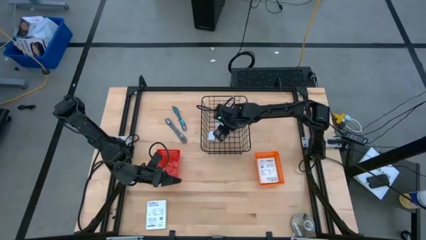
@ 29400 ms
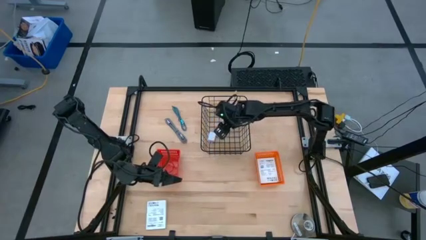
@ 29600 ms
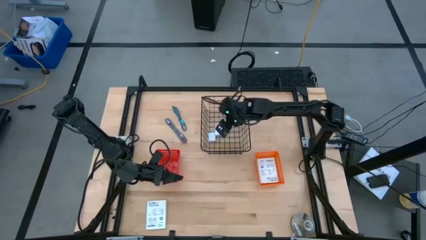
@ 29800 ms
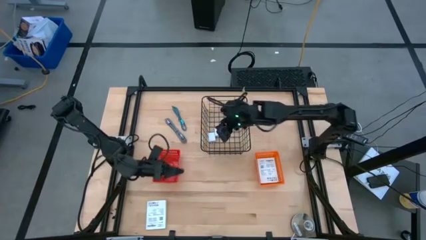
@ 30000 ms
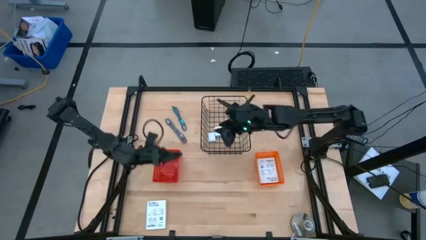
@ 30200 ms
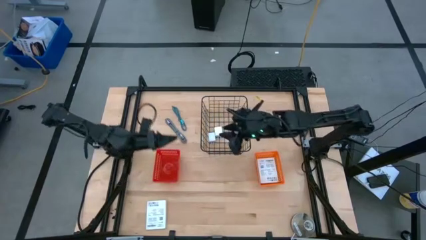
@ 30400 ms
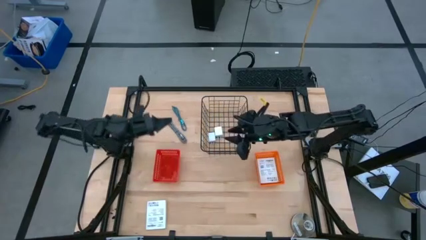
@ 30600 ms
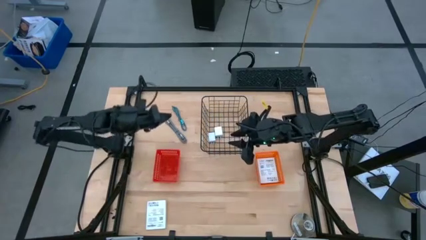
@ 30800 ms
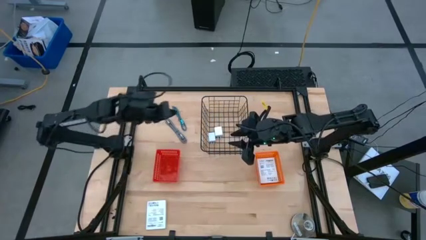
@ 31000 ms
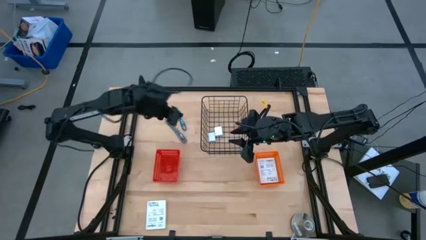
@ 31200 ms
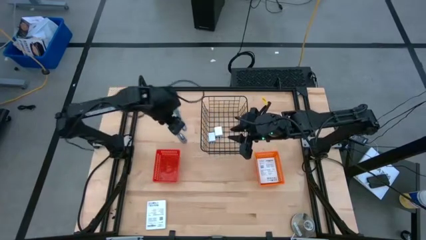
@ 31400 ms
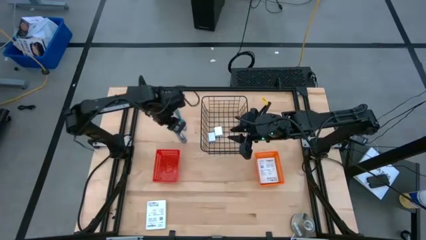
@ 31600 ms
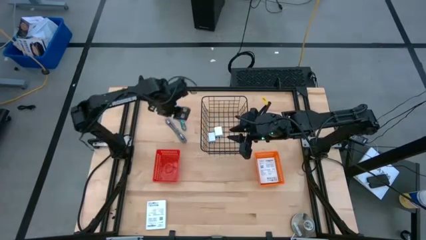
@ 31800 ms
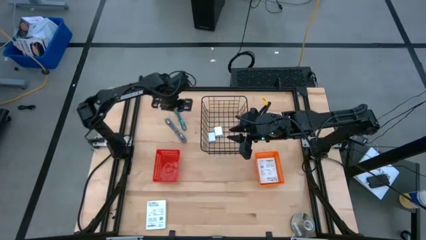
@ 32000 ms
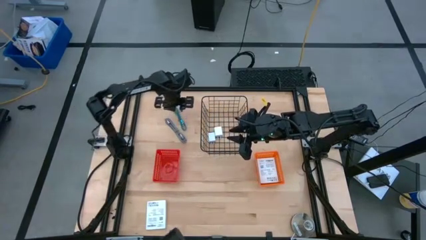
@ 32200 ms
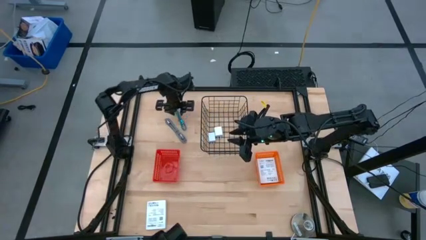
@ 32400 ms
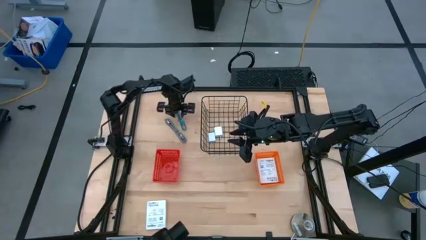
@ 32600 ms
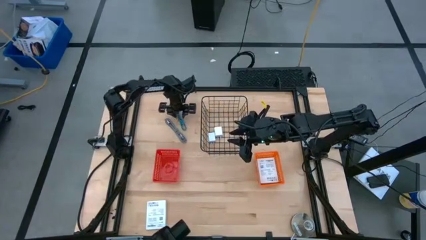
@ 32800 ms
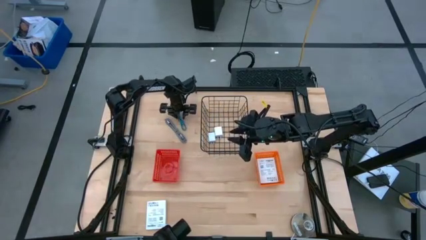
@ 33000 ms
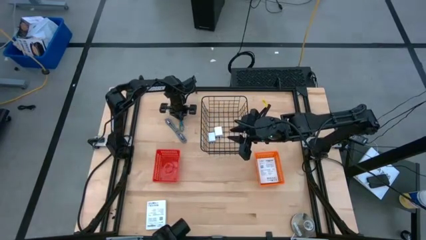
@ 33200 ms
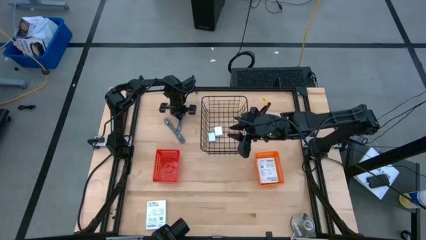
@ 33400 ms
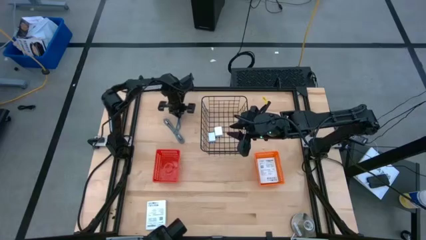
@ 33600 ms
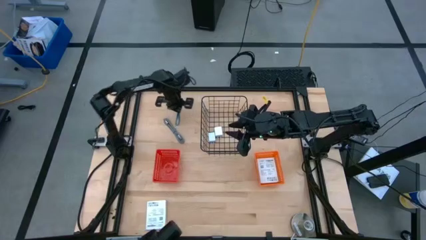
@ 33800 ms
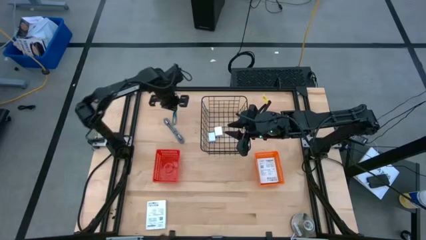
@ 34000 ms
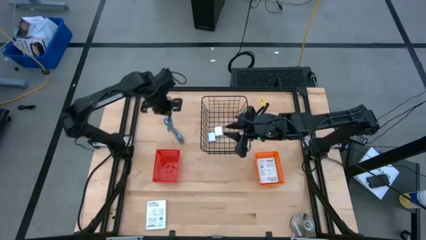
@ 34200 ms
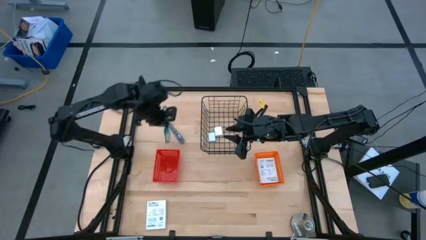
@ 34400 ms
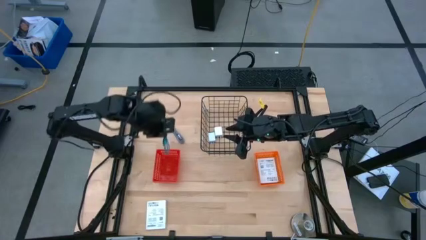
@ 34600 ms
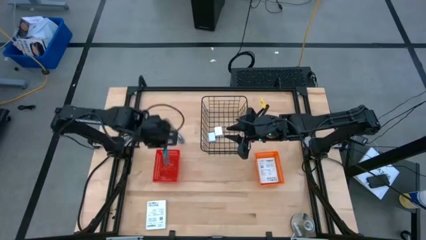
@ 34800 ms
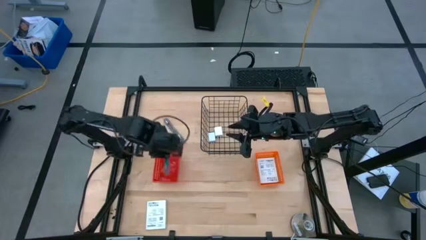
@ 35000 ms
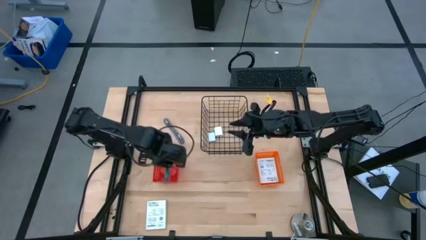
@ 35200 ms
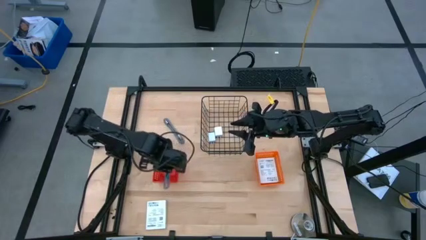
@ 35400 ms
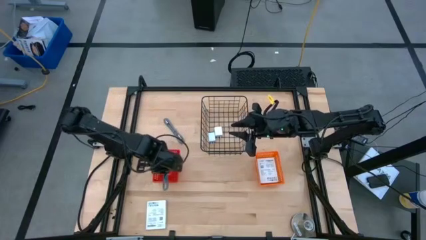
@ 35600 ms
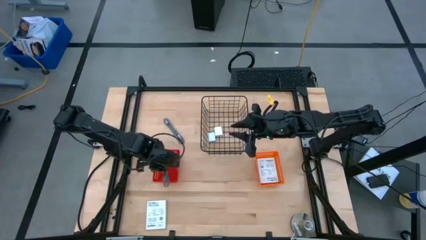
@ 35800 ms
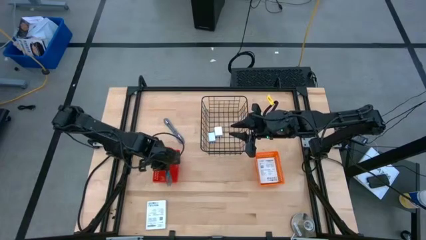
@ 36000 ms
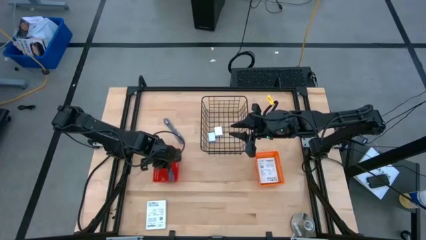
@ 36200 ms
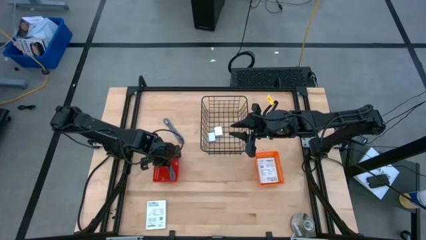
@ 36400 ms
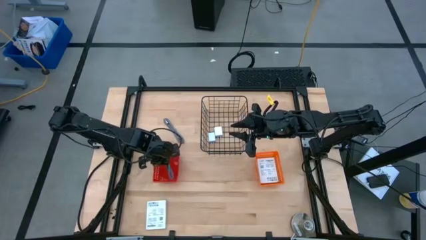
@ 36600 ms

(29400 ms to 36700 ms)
Task: Pick and place items into bin
Put the blue charger cable into the red bin

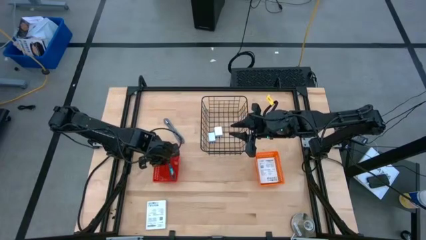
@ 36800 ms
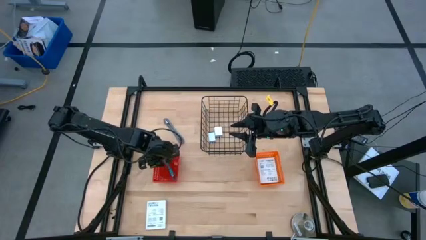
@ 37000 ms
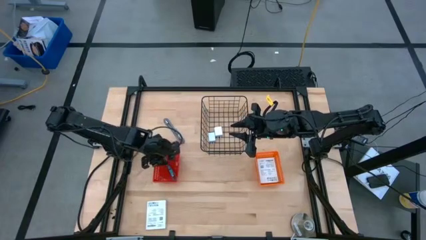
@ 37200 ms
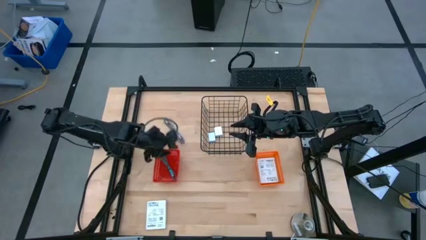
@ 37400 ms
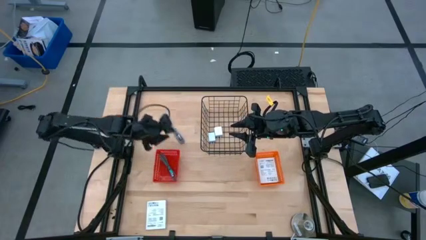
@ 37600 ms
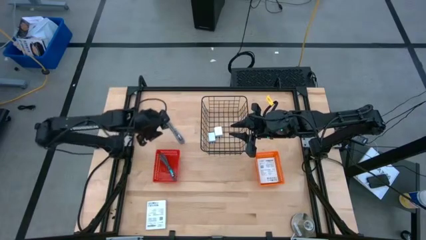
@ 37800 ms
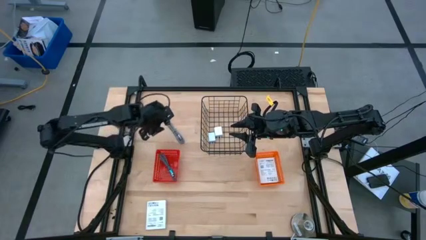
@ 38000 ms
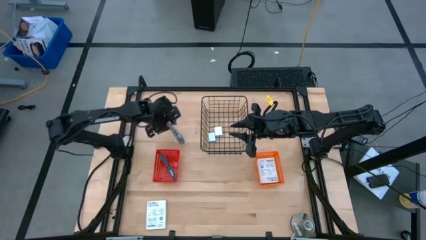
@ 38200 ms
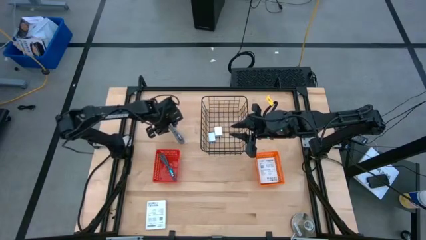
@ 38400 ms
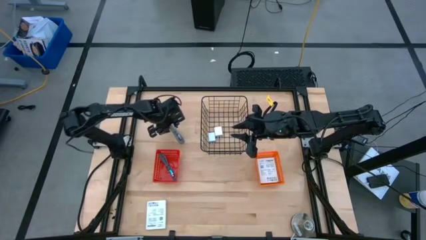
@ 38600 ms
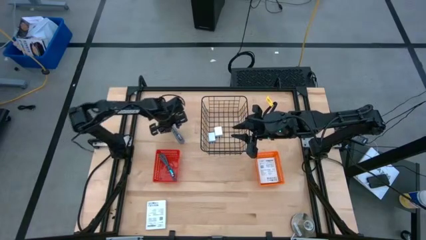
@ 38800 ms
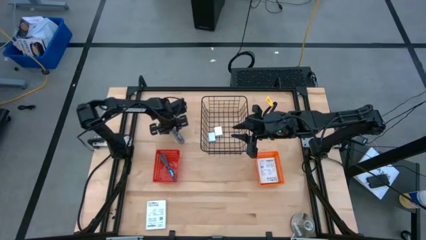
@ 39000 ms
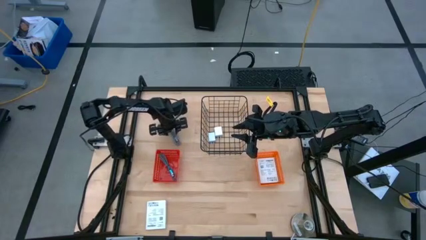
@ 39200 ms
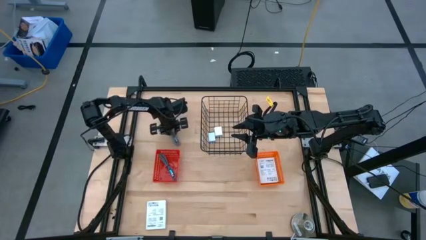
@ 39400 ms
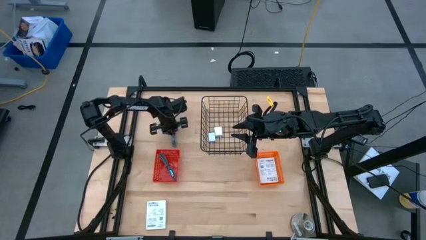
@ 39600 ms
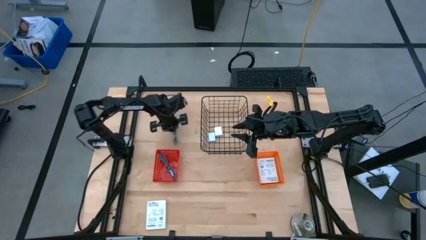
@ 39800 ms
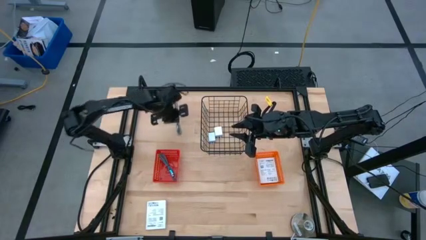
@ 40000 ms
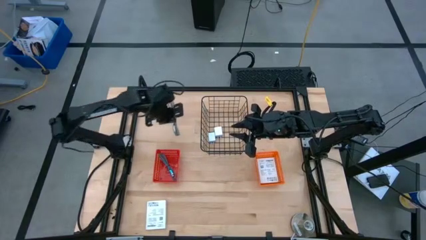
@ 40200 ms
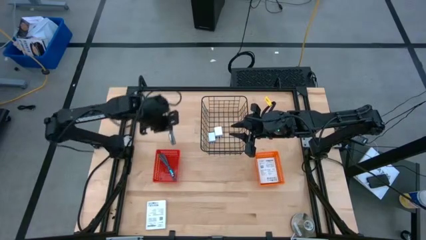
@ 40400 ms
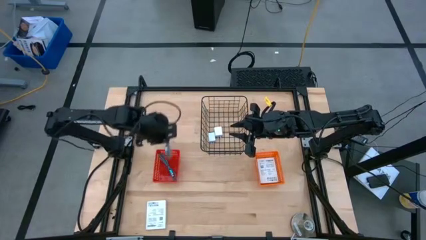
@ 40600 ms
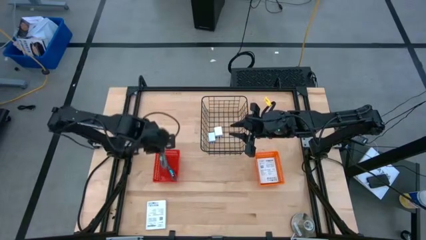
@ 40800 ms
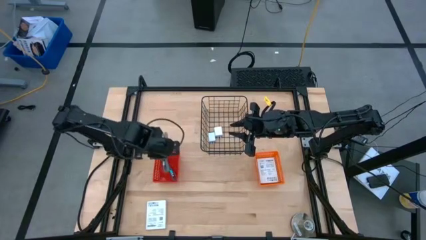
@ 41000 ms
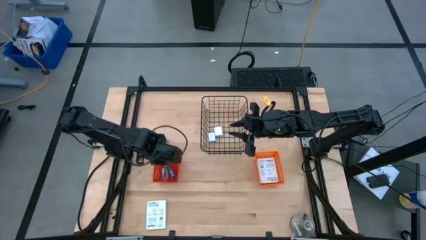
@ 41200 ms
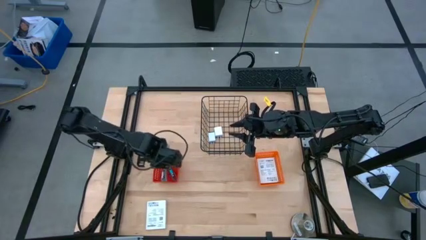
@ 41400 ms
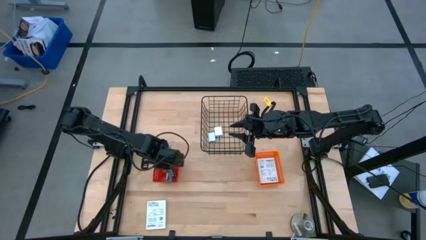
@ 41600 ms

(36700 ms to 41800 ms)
Put the black charger cable into the red bin
